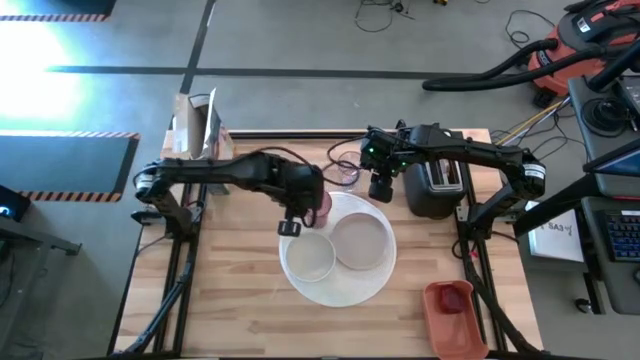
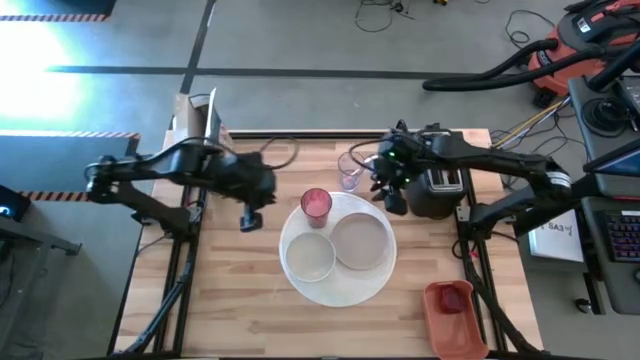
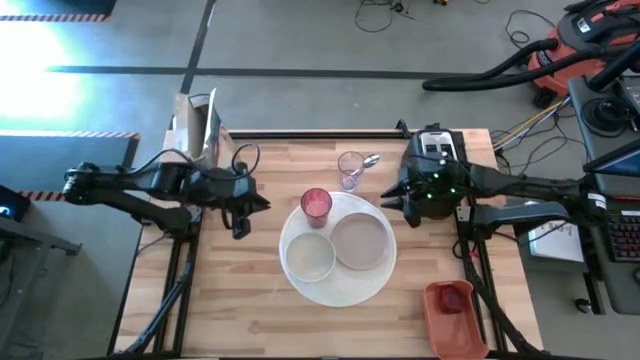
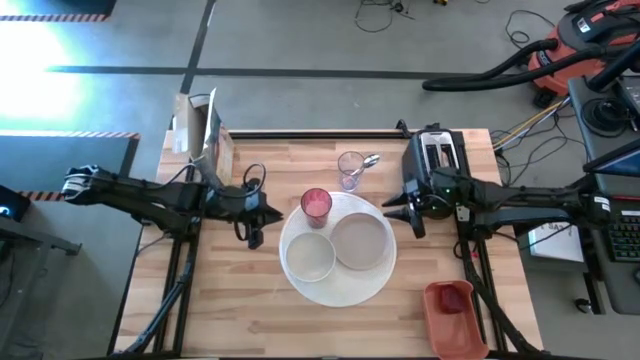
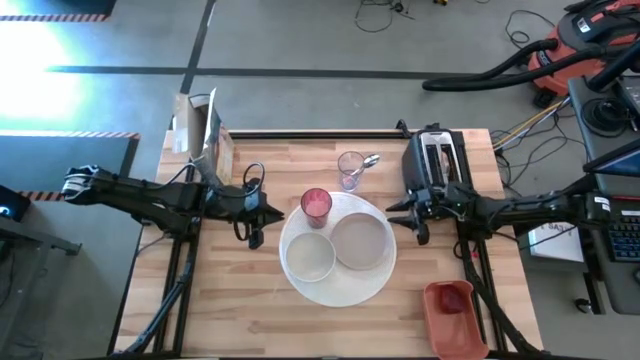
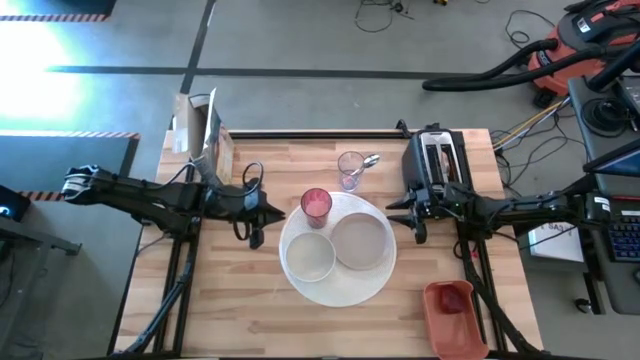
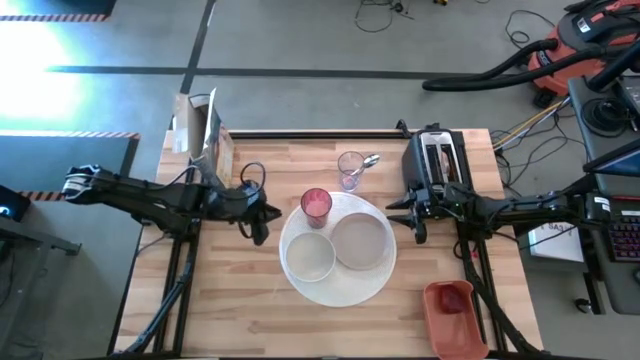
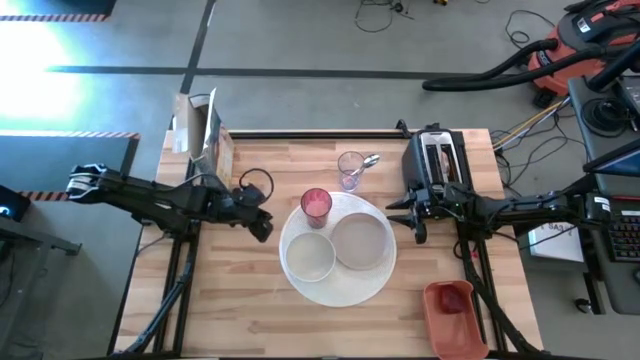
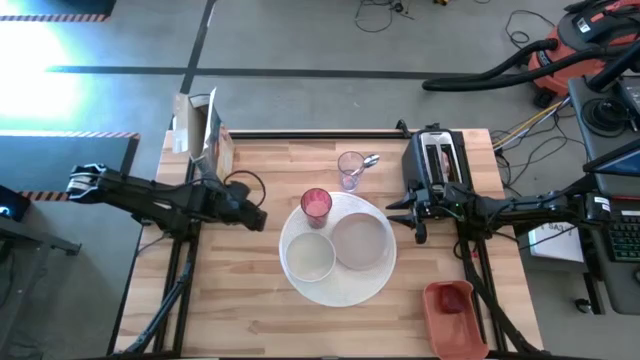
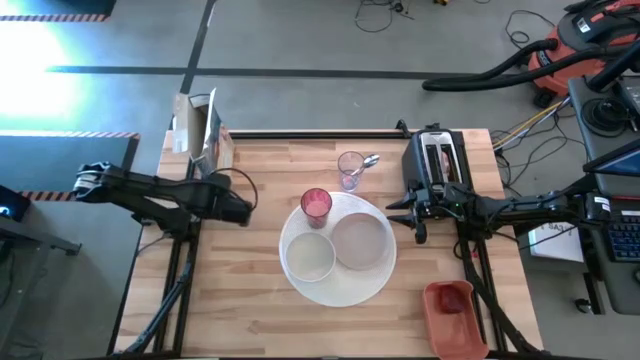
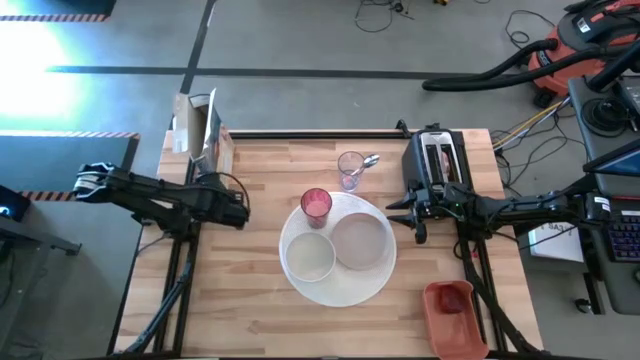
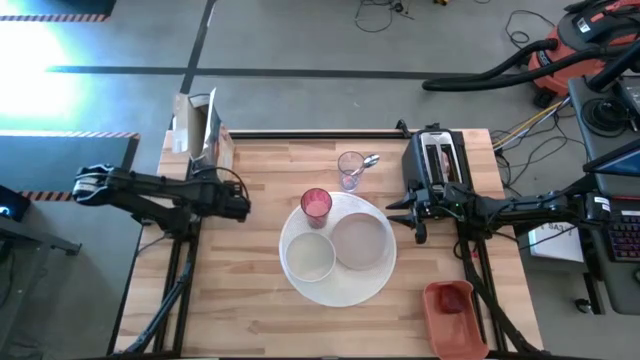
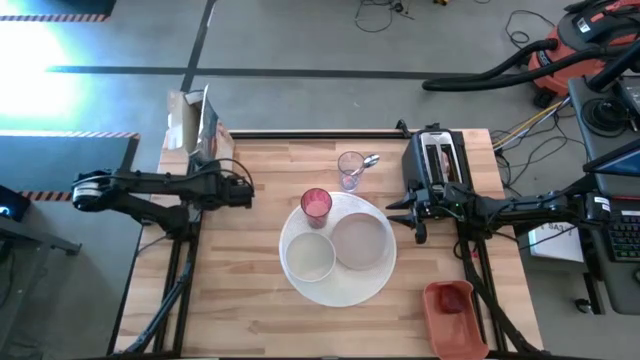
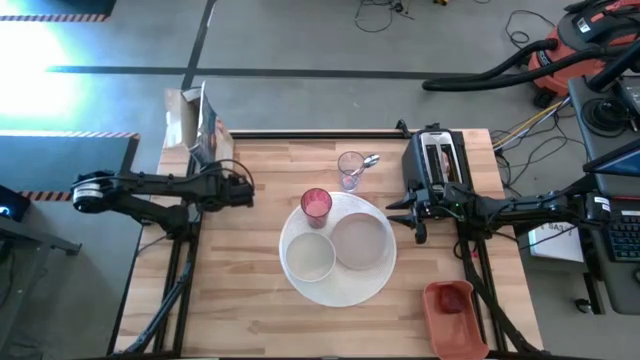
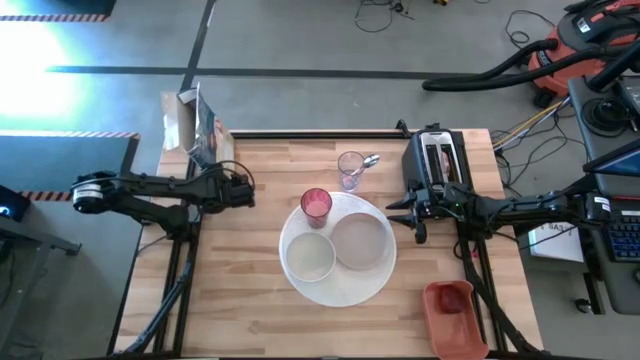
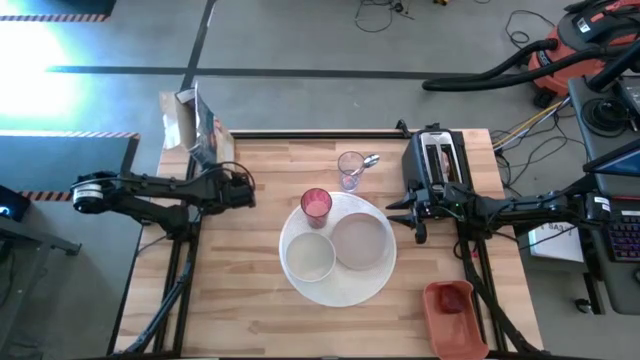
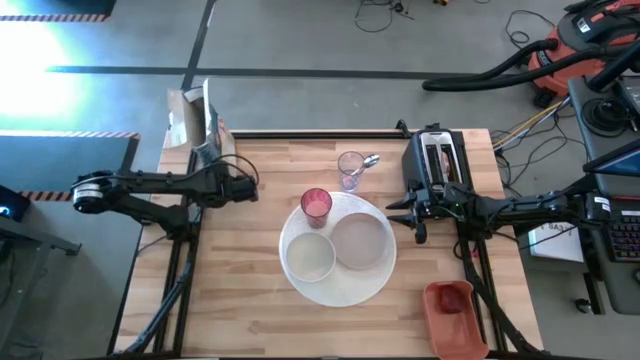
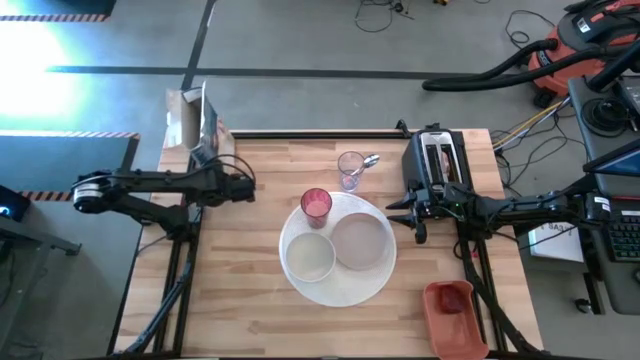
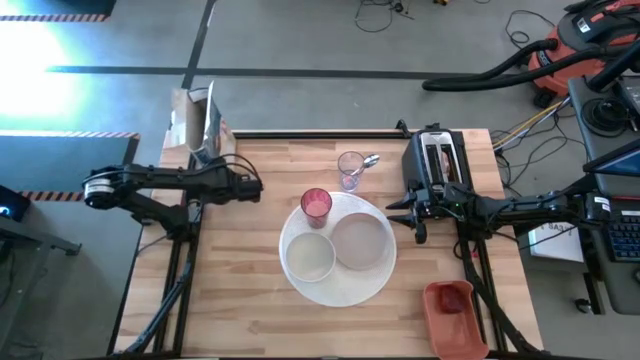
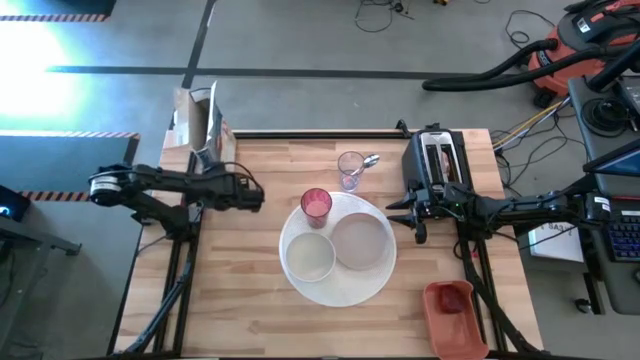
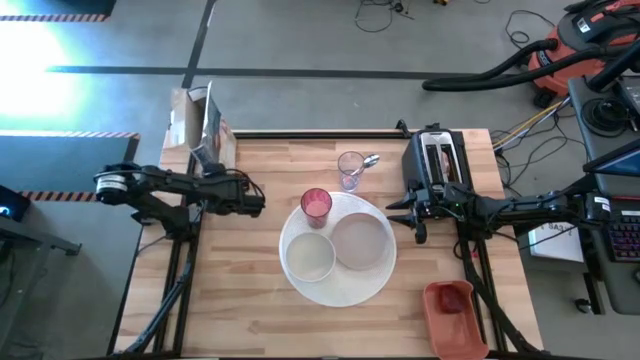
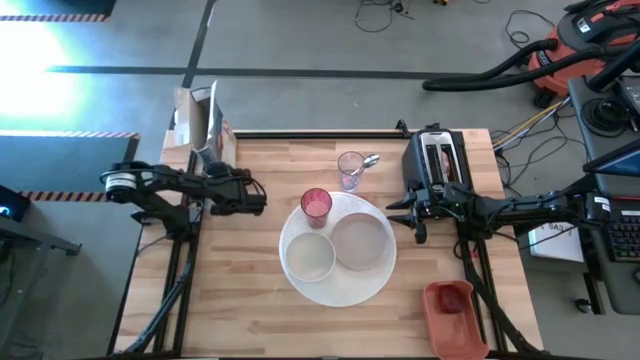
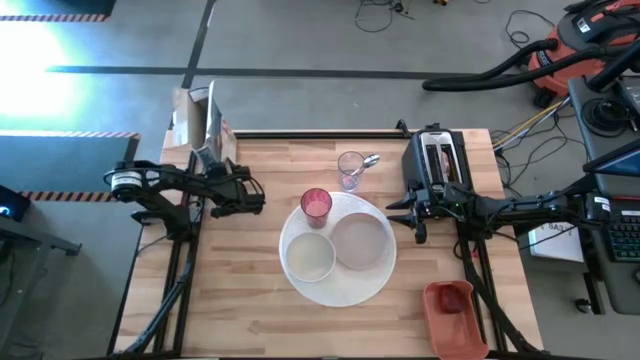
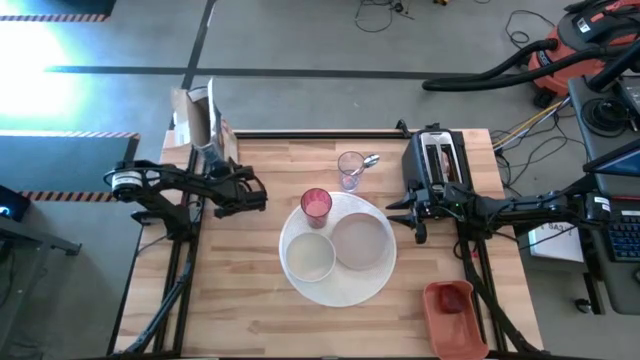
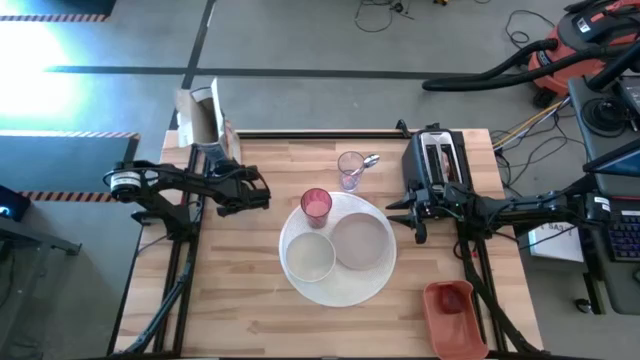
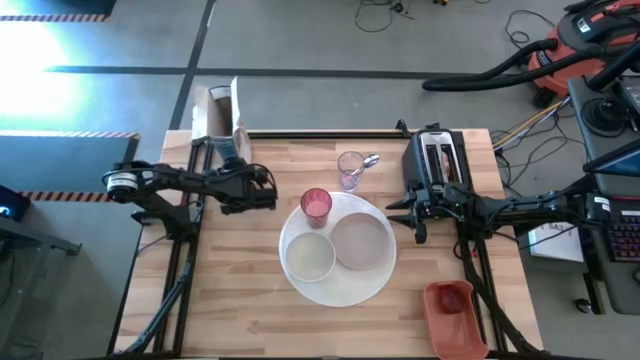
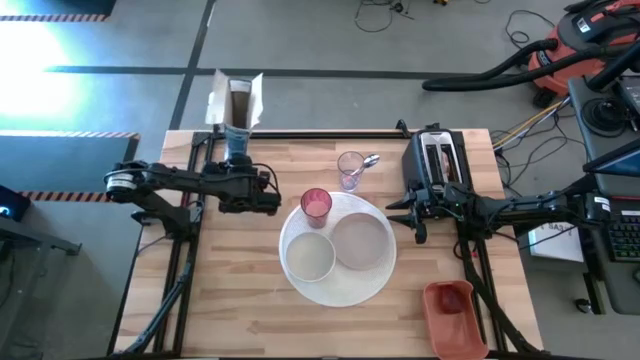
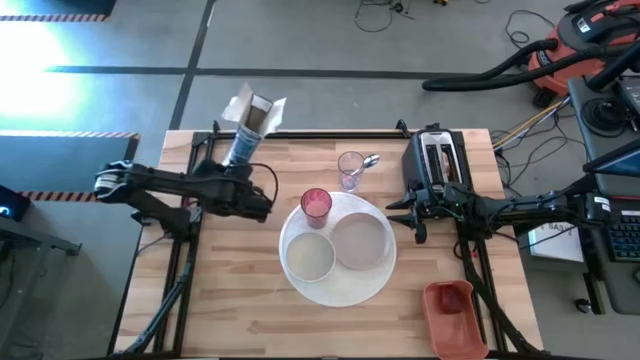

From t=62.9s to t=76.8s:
Task: Arrange a breakfast setting
Pour the cereal from the blue cereal box into the white bowl

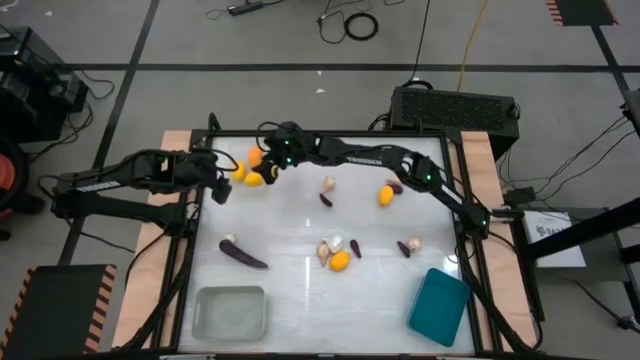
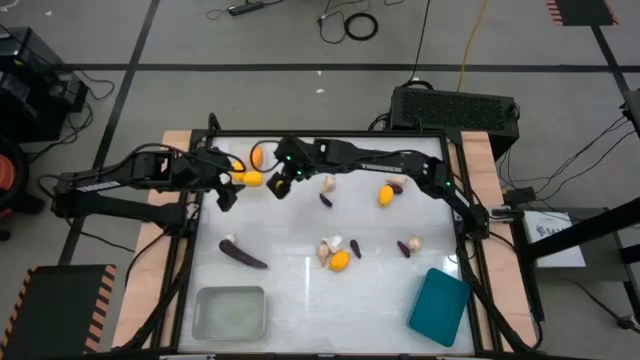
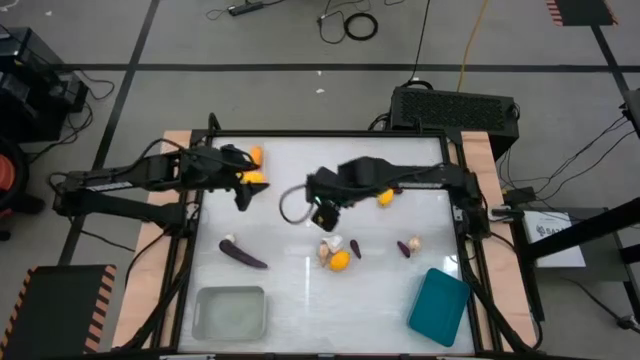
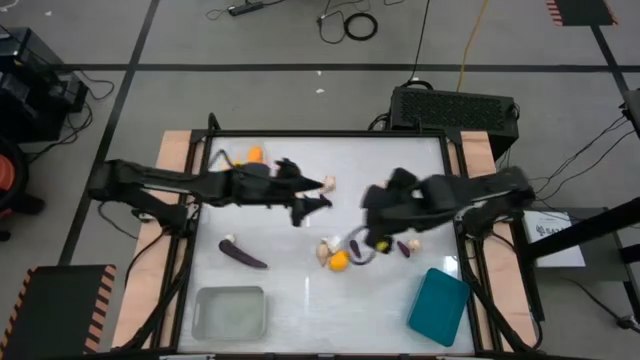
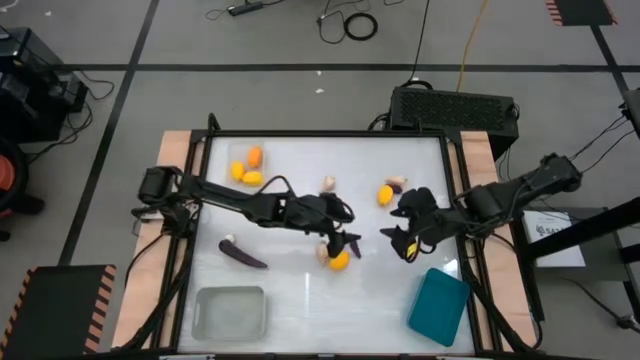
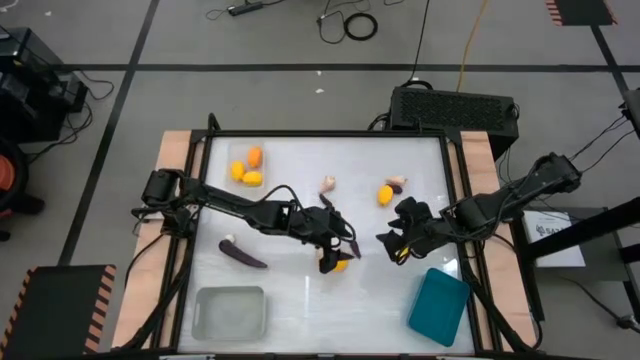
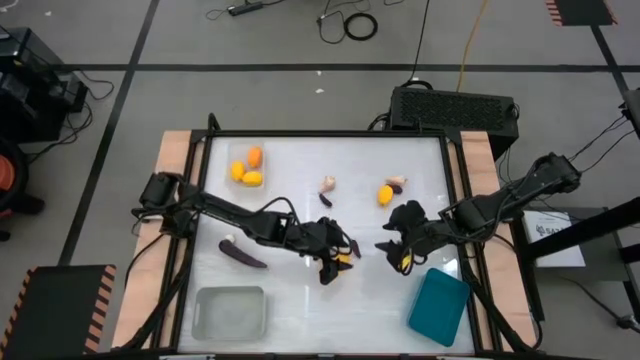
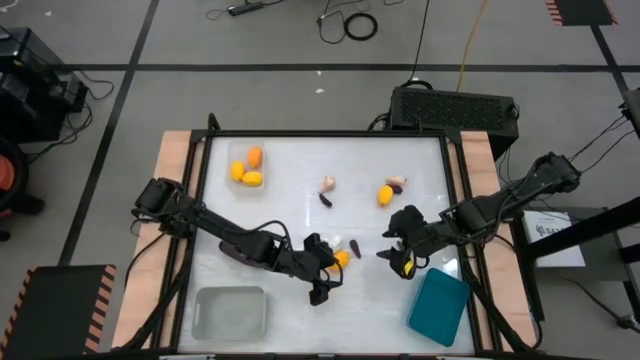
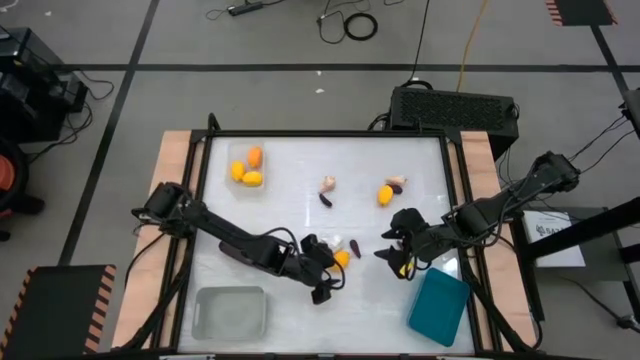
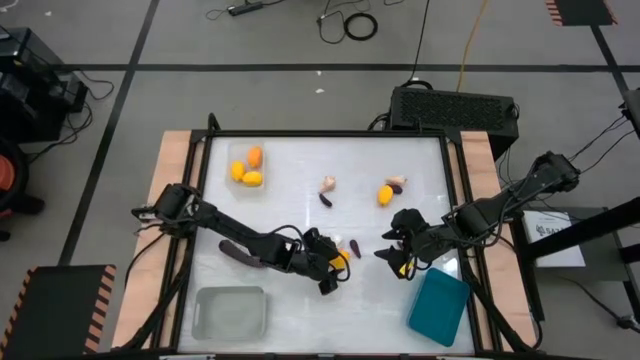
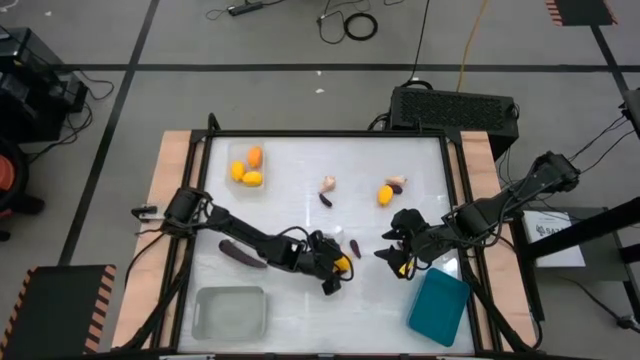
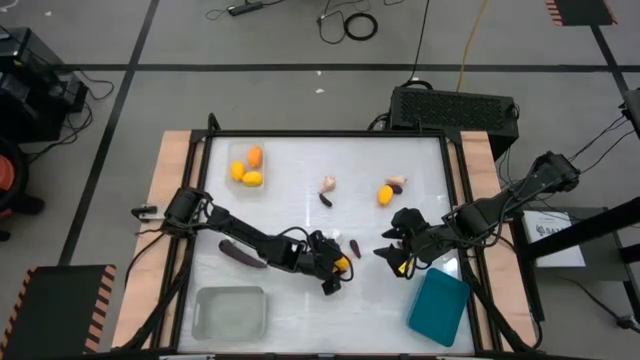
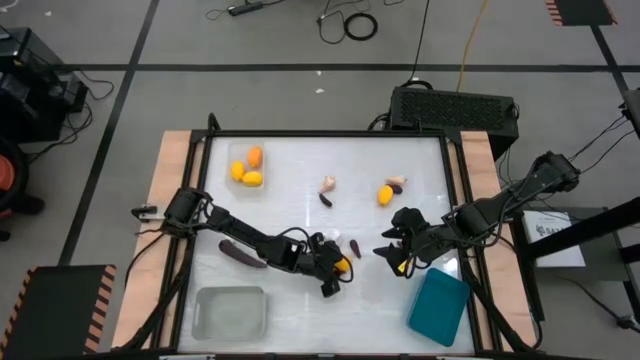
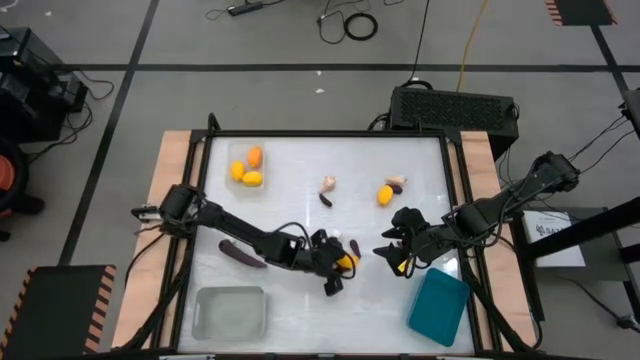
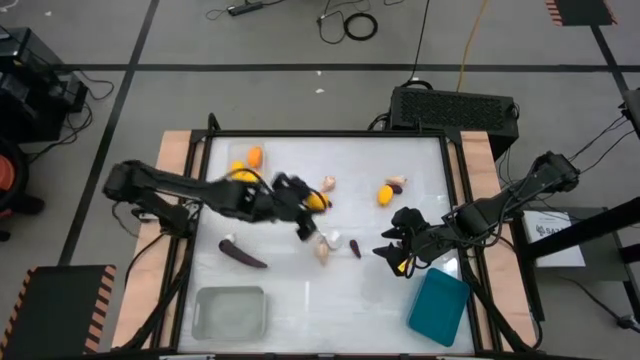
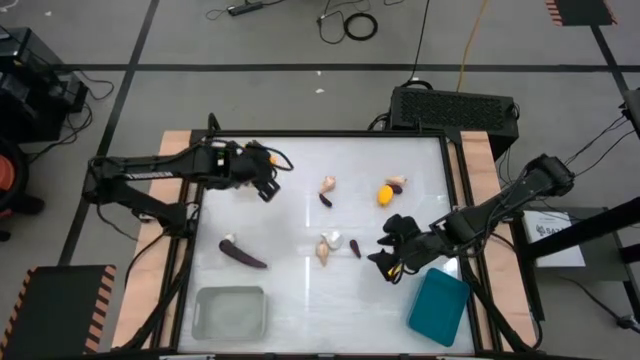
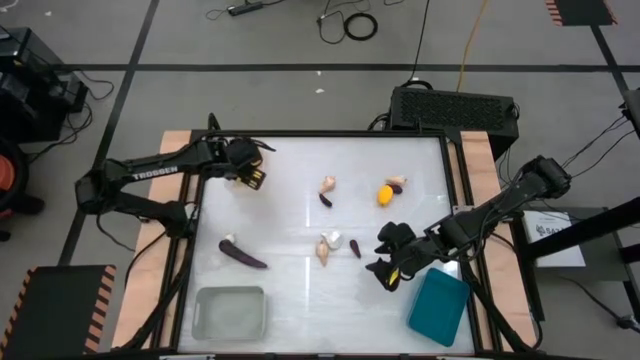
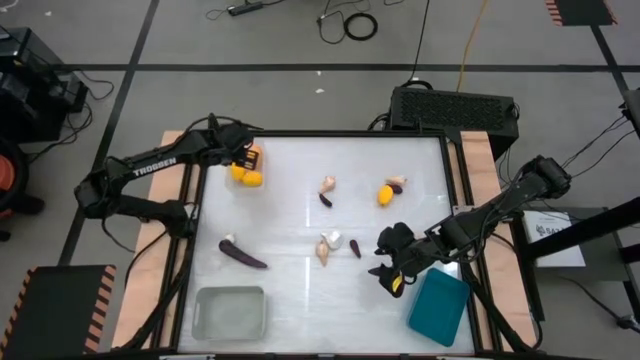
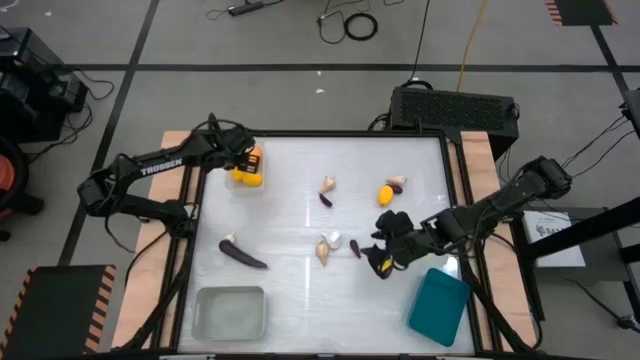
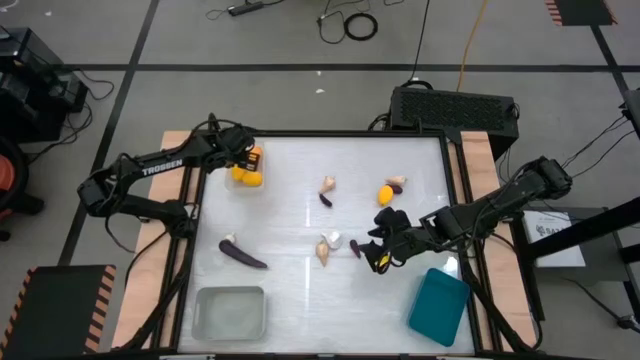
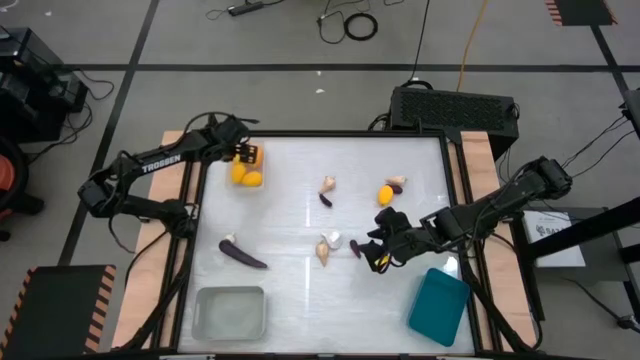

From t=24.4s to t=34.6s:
Task: Sort produce into baskets
Put the yellow lemon into the white bin
